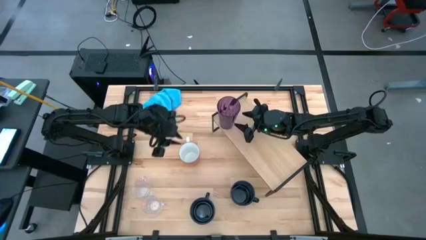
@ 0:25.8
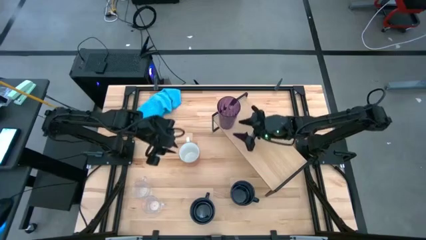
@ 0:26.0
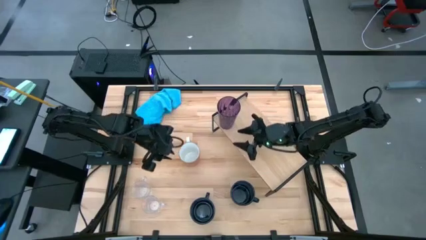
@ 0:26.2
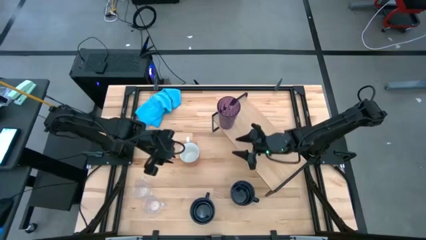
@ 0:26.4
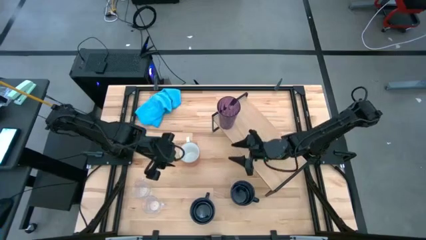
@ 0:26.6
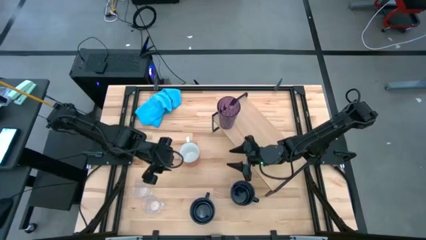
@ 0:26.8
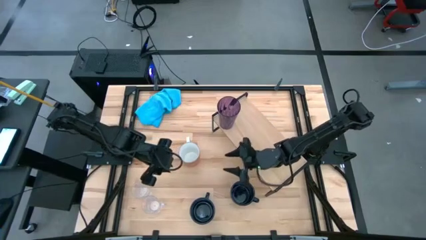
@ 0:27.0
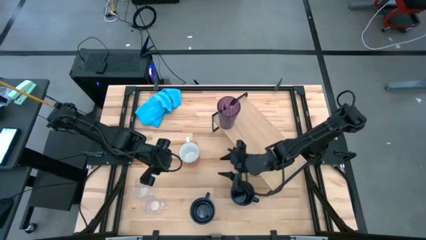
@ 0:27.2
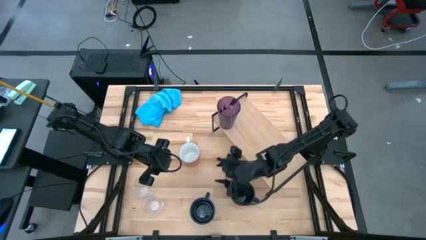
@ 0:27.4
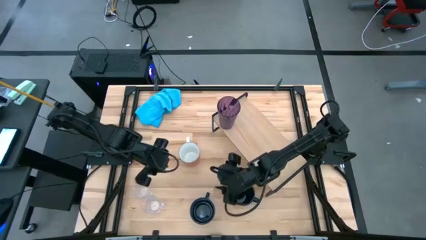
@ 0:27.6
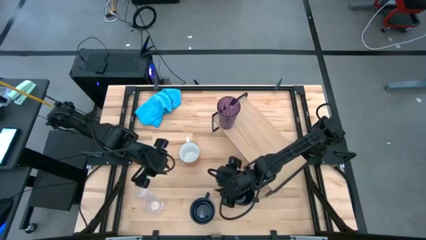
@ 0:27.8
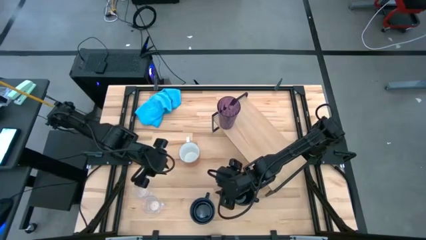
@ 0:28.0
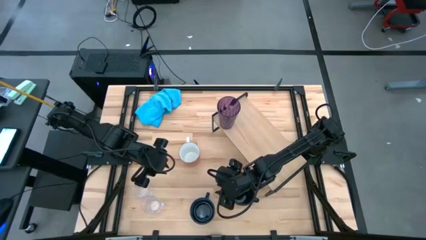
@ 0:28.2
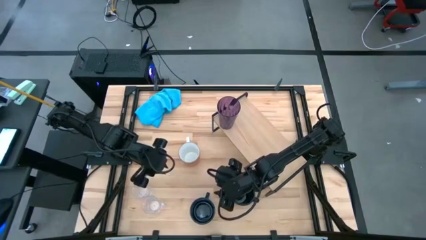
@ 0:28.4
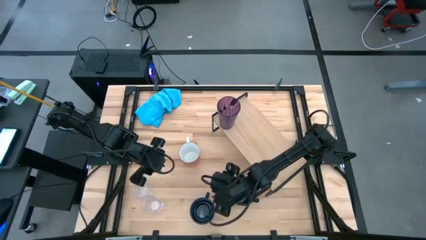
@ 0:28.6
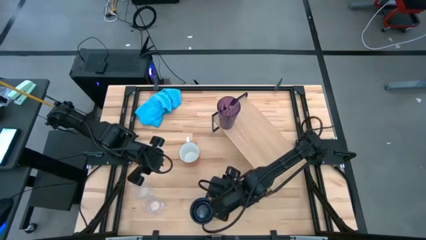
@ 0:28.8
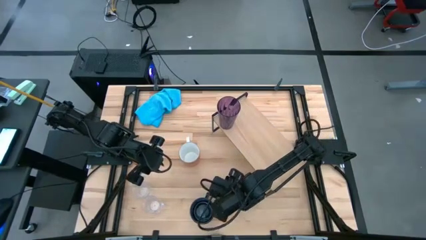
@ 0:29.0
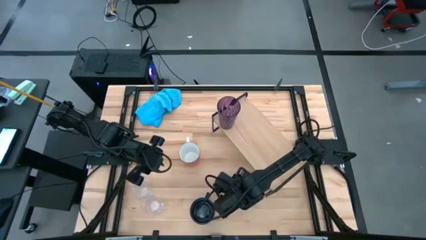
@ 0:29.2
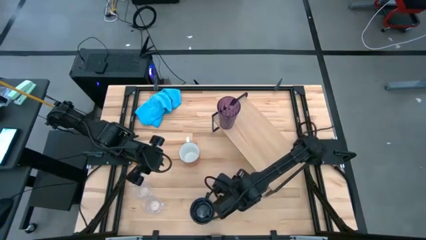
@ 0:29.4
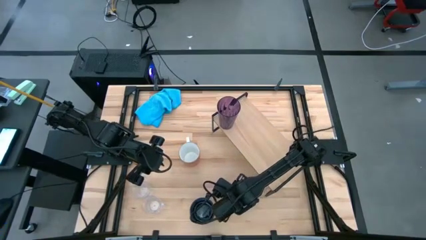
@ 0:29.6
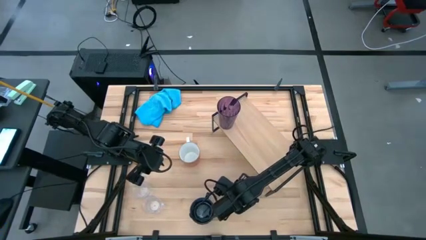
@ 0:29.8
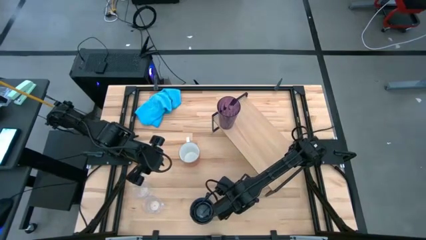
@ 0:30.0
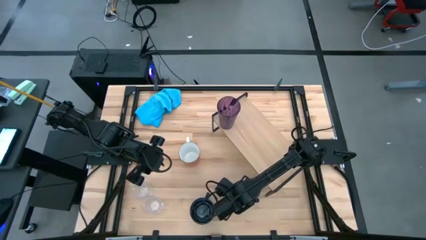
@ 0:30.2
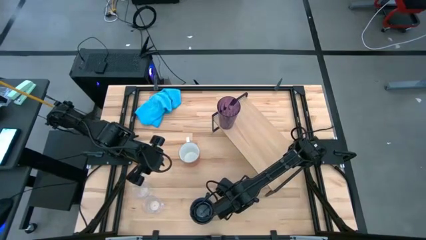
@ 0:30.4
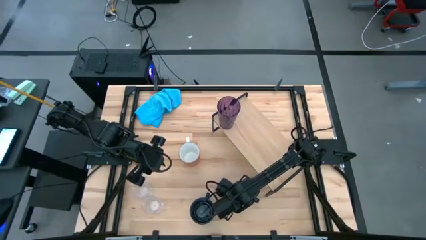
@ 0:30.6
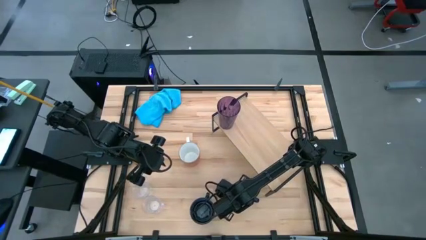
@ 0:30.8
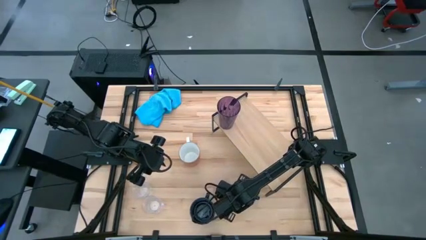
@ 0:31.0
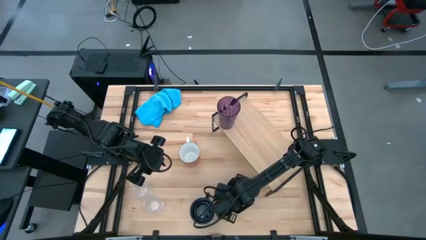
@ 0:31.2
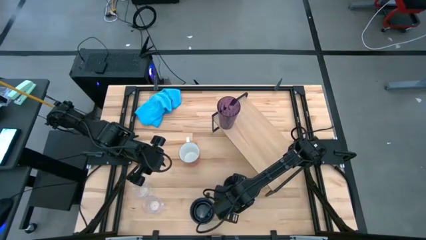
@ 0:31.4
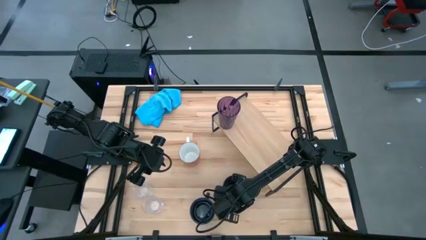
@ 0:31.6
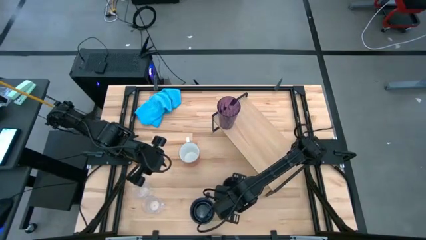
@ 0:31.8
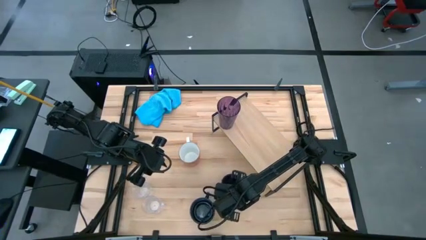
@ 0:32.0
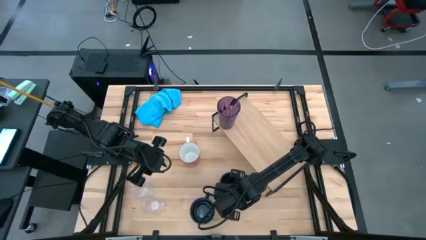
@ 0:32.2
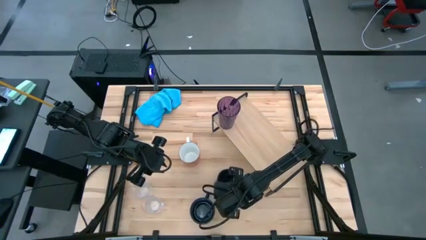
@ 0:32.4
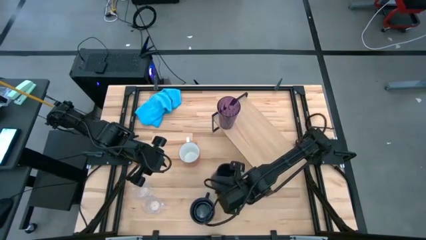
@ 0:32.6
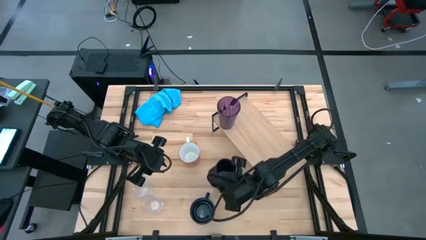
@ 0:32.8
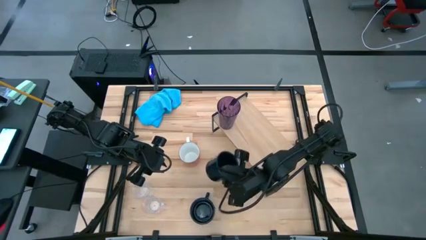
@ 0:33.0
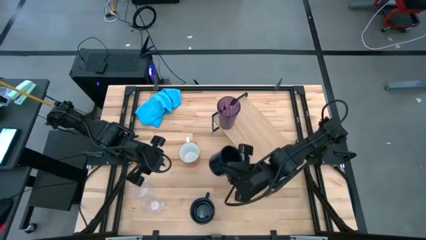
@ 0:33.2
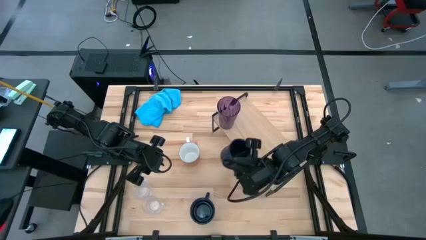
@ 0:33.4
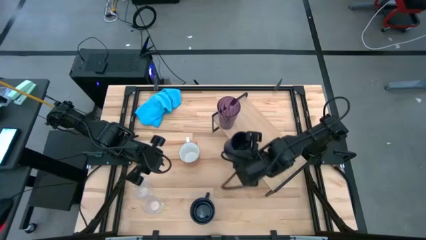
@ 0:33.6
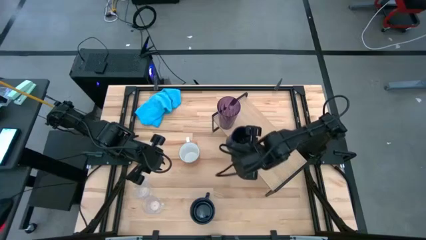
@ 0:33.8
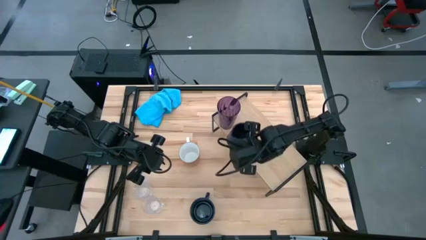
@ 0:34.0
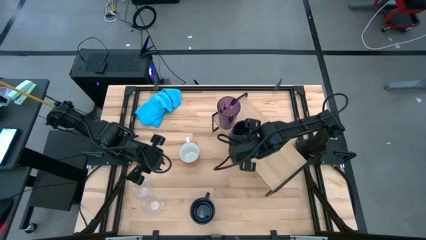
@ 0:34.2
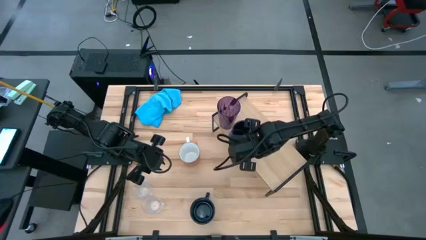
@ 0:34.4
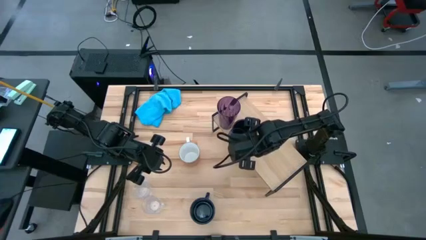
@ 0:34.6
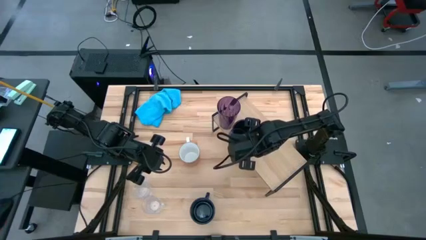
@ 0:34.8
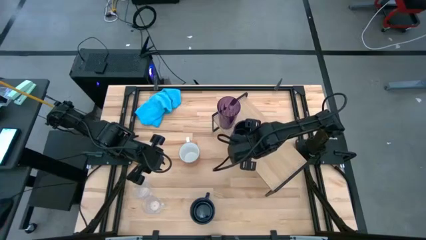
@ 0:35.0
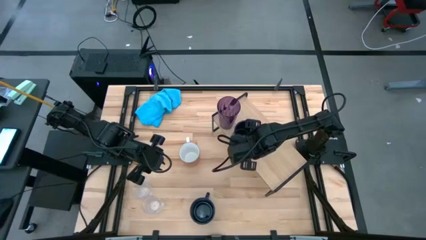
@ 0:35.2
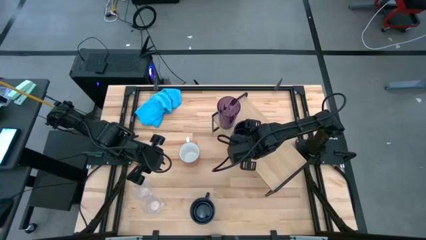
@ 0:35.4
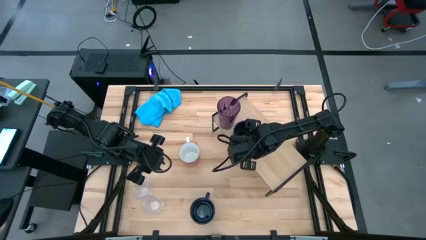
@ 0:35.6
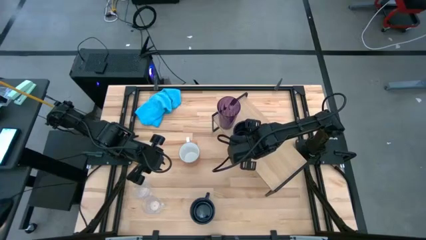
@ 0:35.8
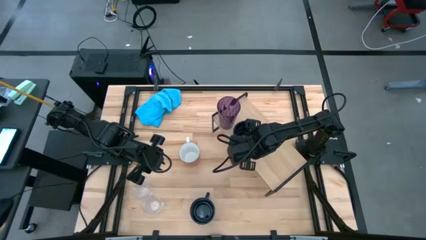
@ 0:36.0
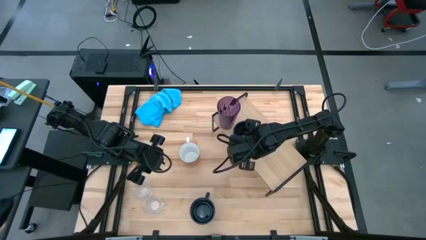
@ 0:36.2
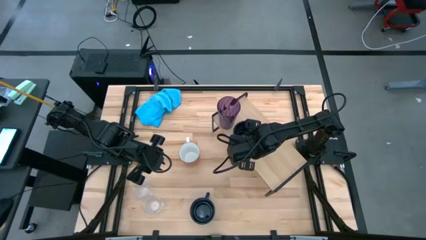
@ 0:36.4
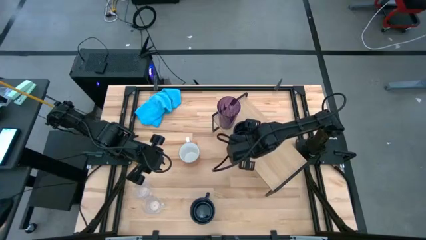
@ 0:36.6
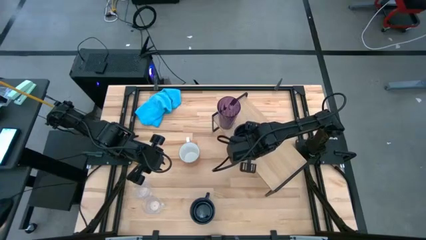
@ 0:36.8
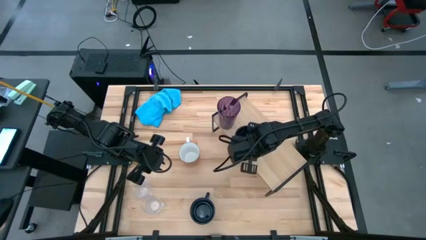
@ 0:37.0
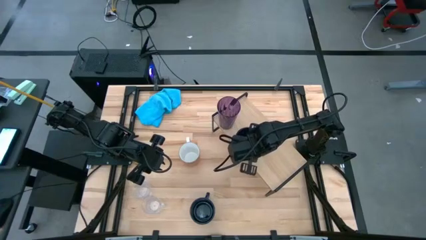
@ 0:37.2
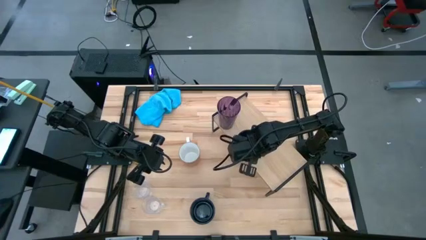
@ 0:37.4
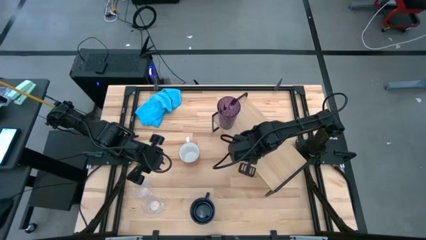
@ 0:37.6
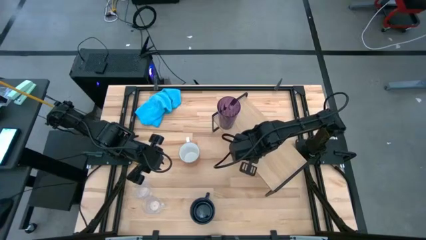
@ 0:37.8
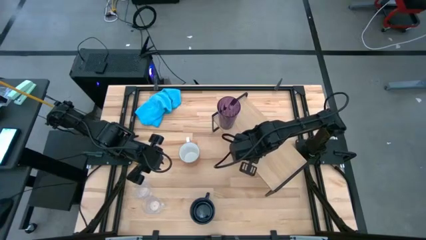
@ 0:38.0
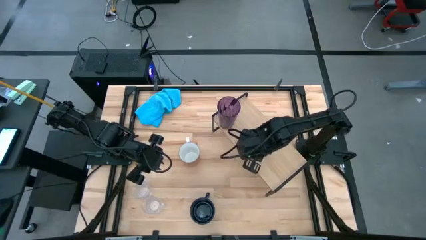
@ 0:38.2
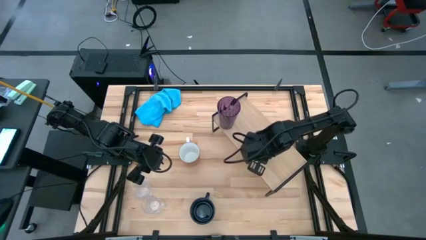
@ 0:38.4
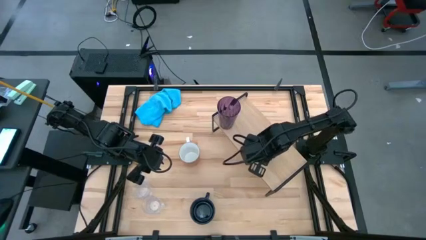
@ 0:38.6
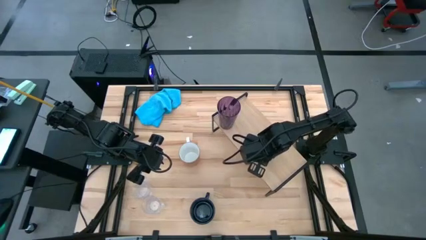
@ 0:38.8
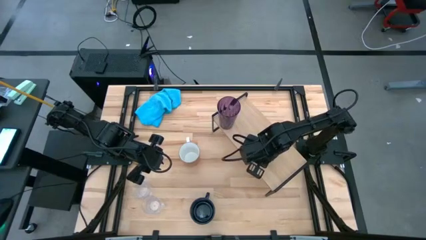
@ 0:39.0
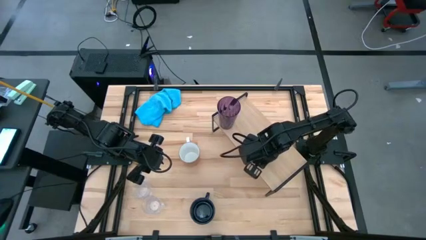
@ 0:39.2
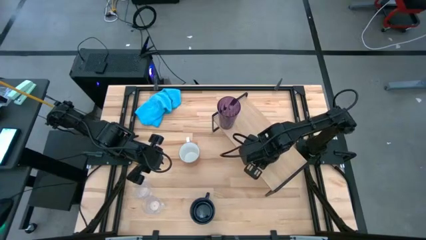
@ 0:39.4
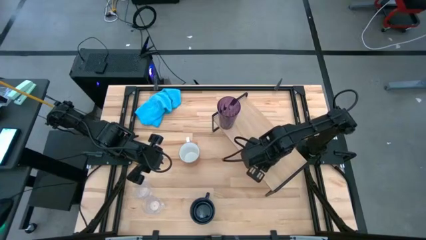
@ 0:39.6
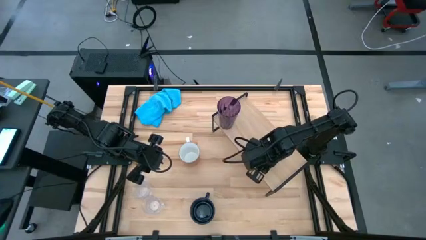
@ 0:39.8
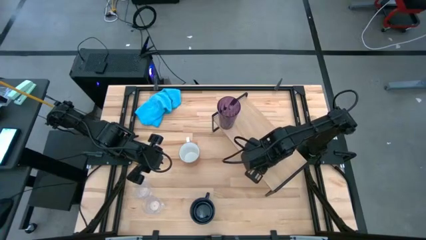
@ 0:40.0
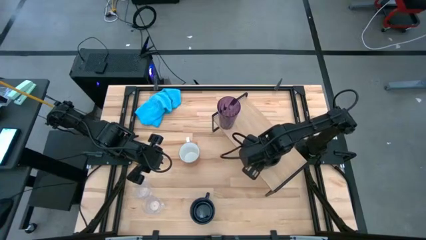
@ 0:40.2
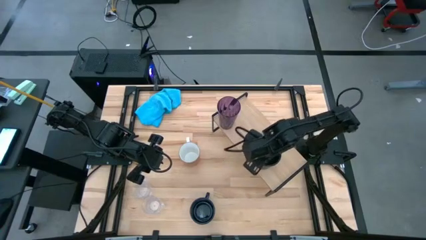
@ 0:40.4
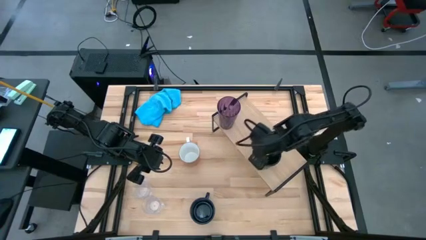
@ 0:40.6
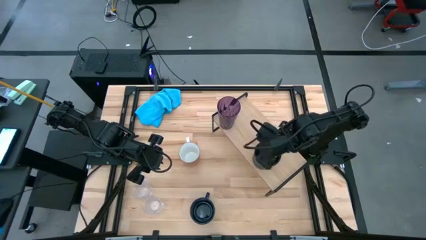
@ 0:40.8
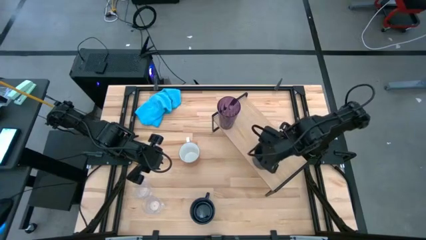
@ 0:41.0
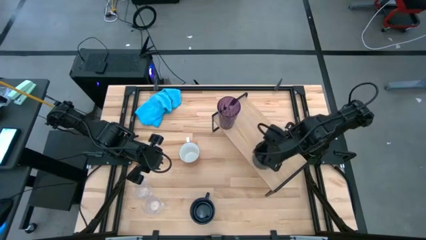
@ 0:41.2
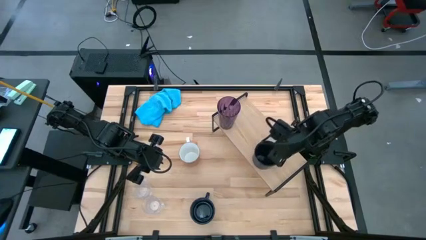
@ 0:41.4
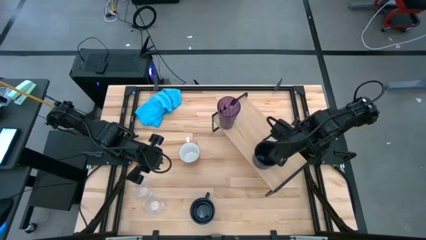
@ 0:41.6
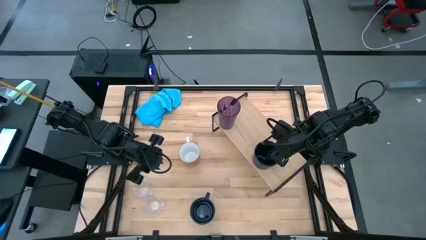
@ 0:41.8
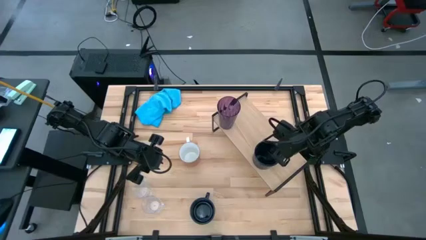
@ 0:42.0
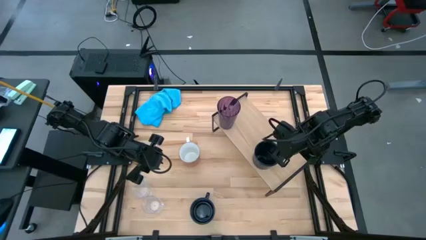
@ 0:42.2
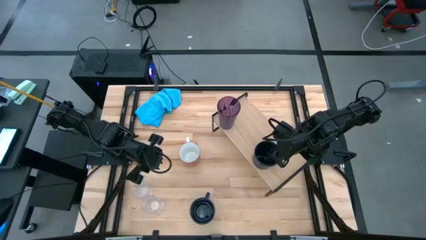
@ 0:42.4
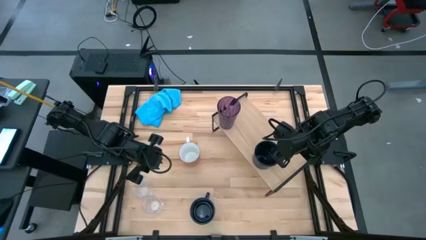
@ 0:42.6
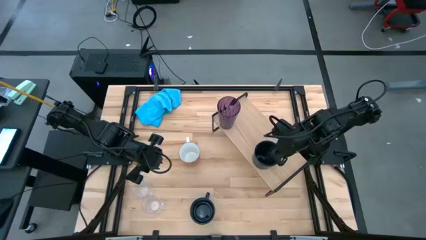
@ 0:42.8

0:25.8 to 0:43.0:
Task: Stack small to large cups/mugs on shelf
Put the right black mug on the shelf
